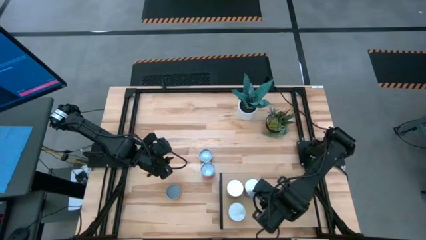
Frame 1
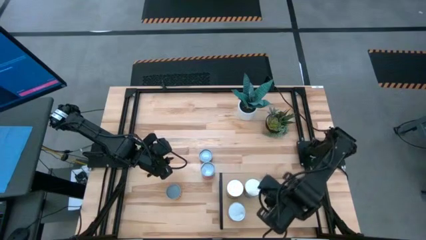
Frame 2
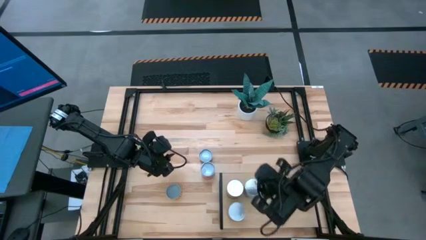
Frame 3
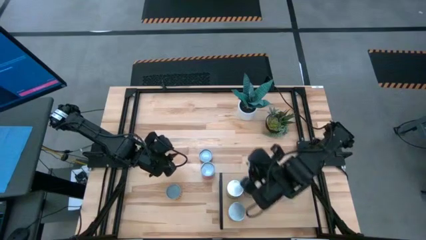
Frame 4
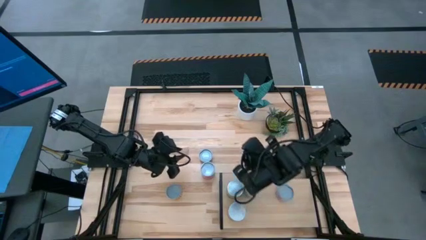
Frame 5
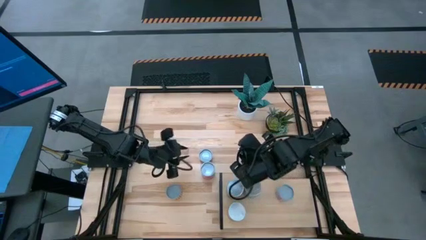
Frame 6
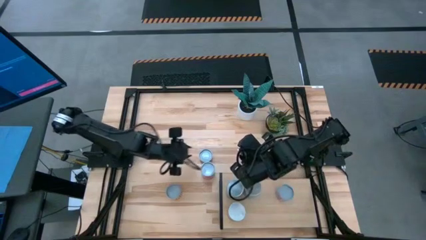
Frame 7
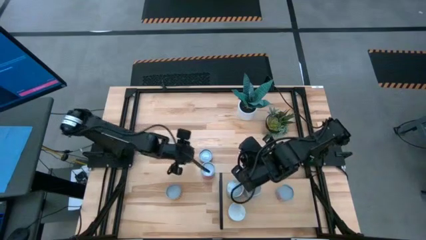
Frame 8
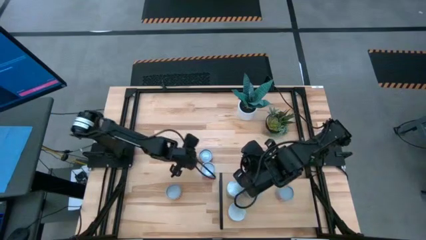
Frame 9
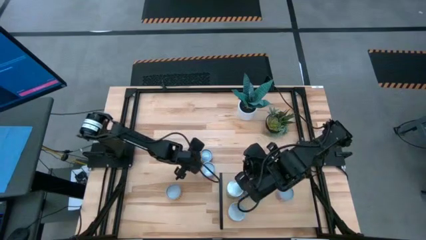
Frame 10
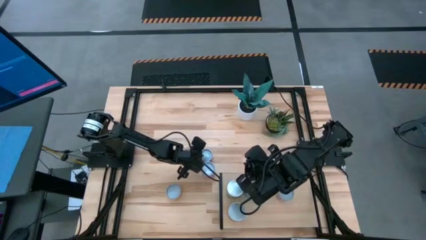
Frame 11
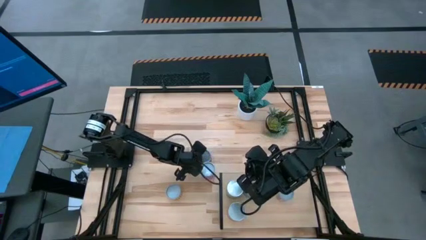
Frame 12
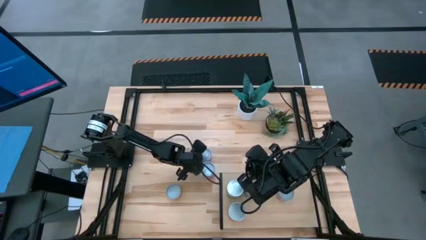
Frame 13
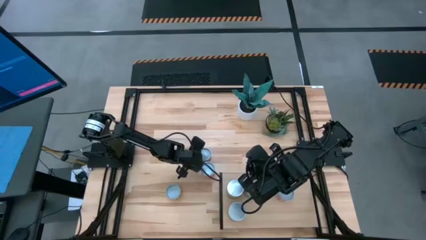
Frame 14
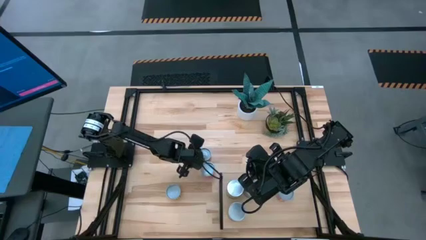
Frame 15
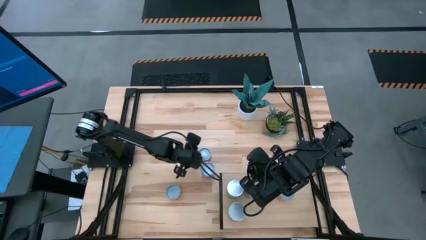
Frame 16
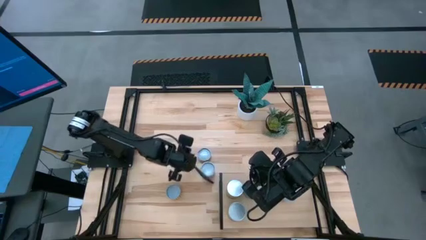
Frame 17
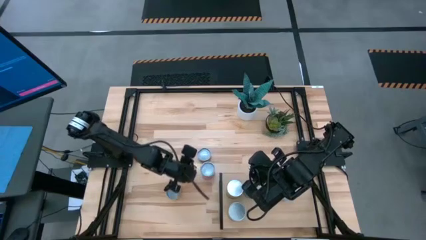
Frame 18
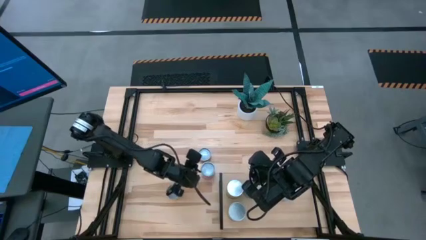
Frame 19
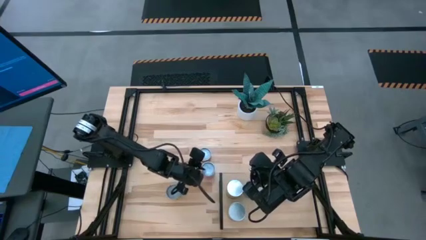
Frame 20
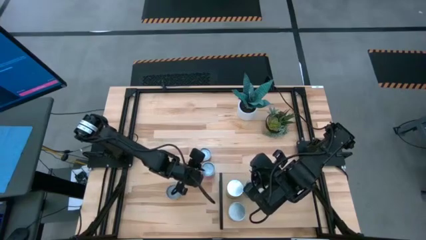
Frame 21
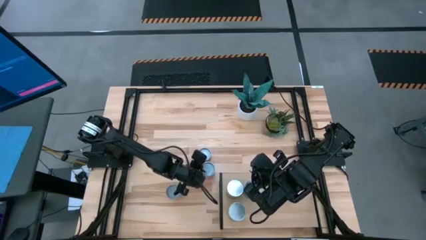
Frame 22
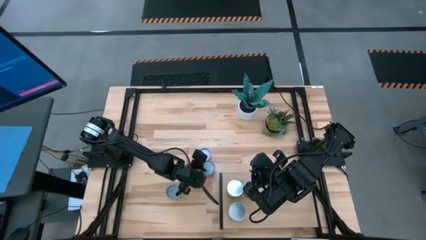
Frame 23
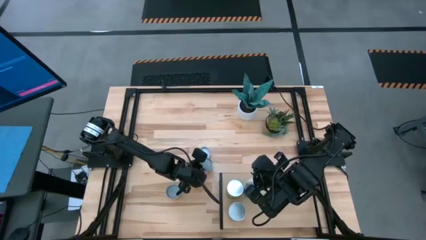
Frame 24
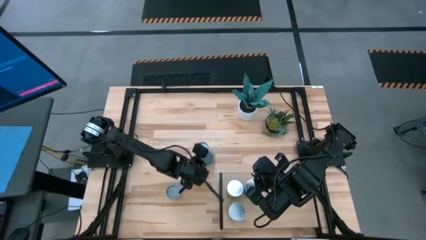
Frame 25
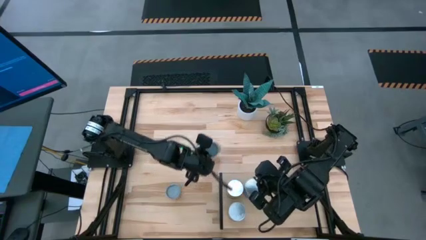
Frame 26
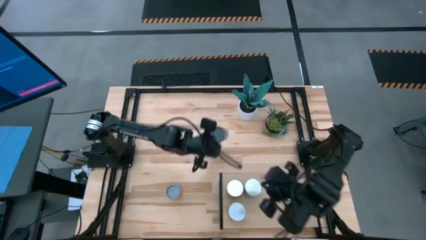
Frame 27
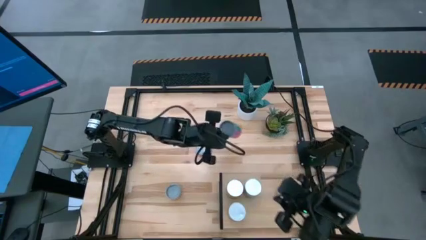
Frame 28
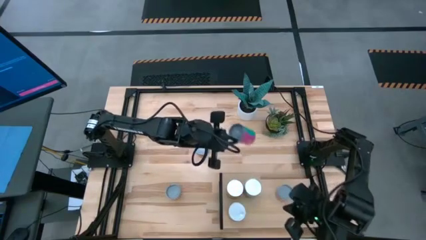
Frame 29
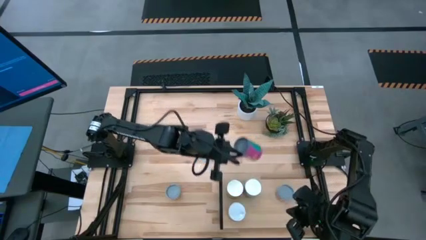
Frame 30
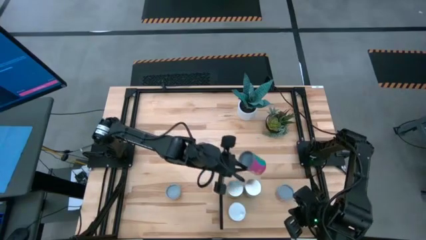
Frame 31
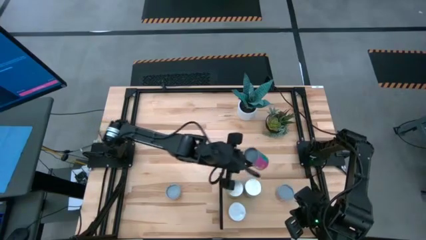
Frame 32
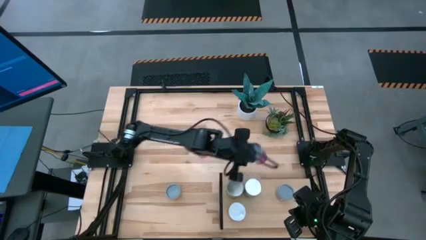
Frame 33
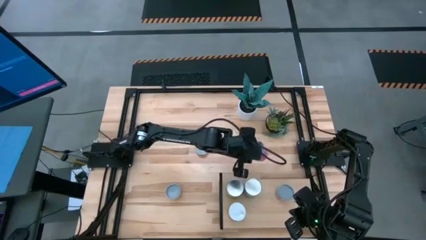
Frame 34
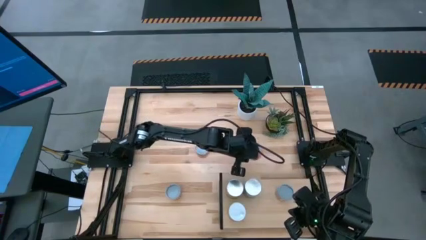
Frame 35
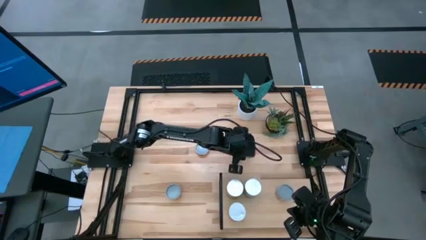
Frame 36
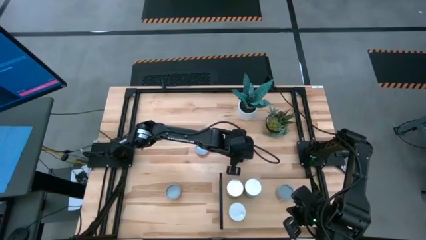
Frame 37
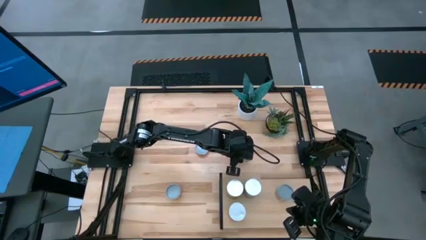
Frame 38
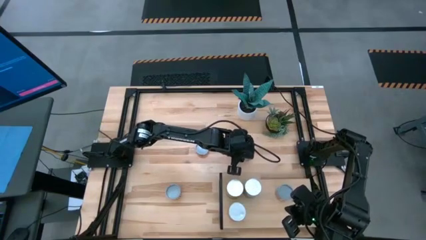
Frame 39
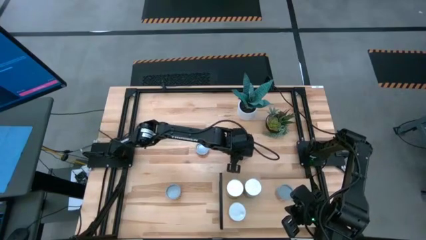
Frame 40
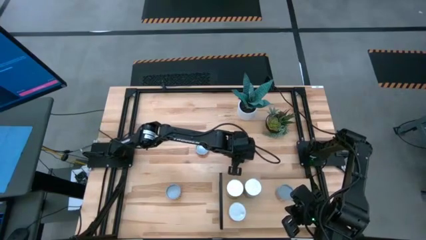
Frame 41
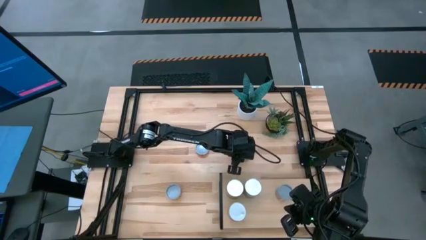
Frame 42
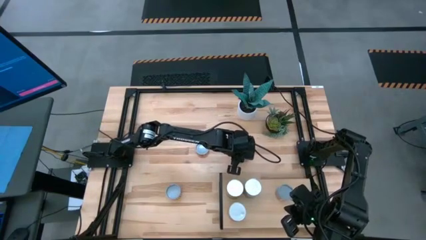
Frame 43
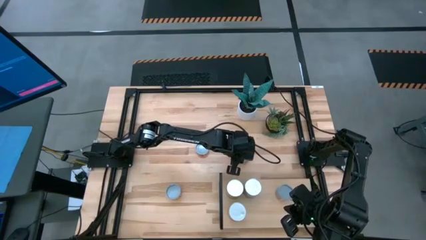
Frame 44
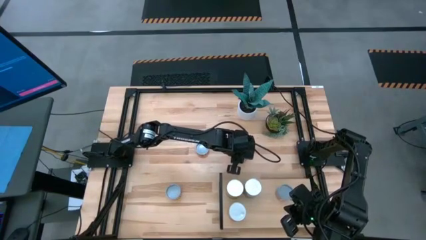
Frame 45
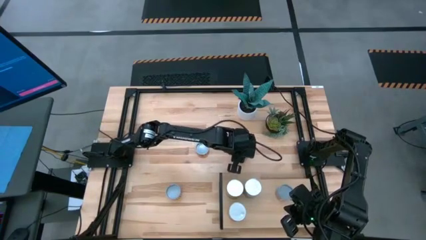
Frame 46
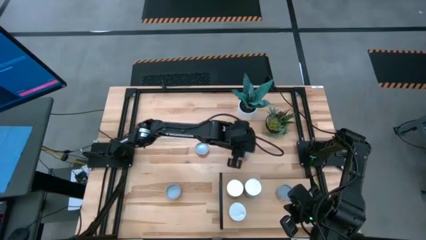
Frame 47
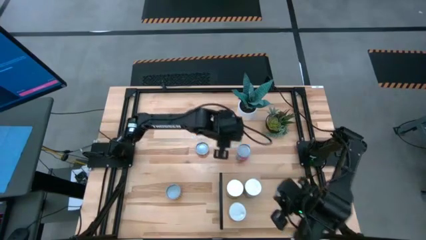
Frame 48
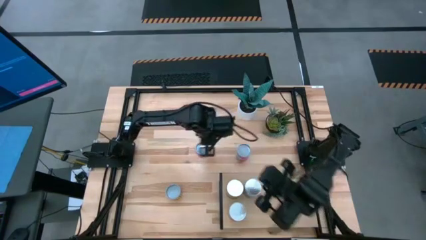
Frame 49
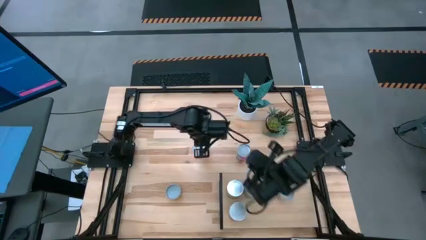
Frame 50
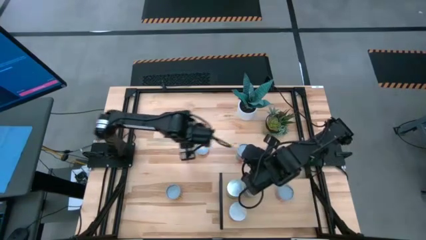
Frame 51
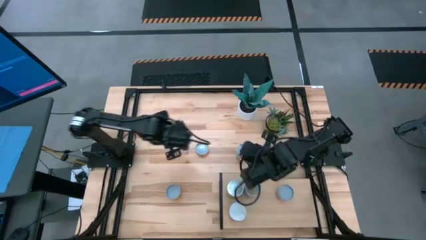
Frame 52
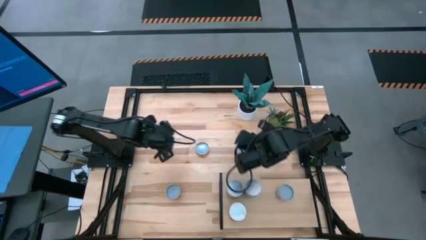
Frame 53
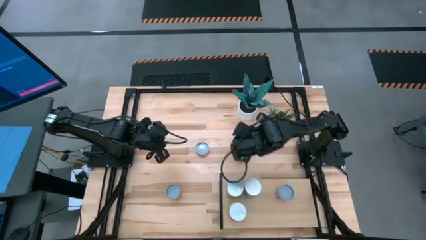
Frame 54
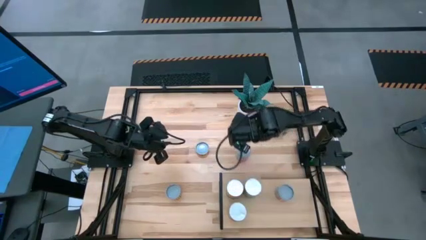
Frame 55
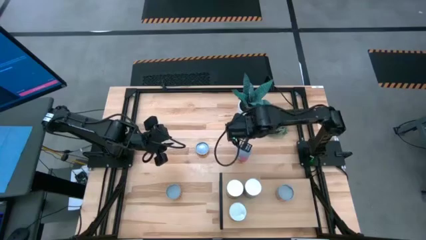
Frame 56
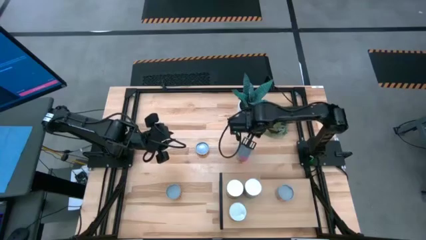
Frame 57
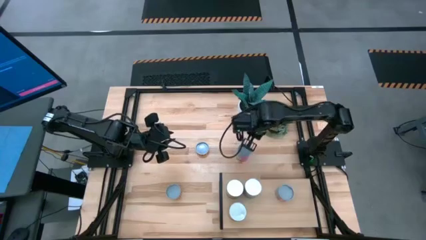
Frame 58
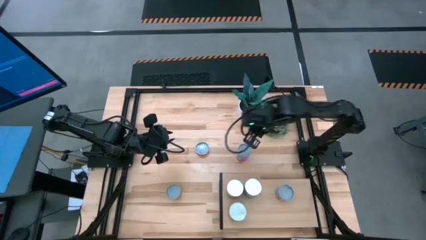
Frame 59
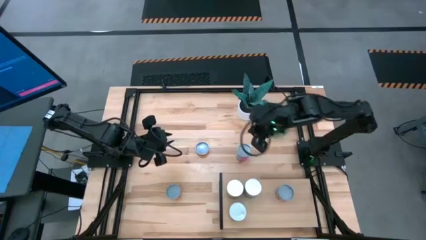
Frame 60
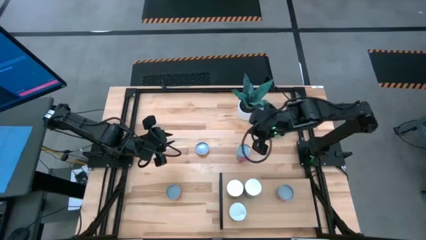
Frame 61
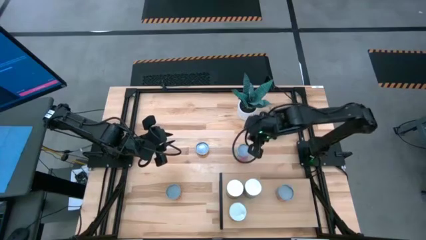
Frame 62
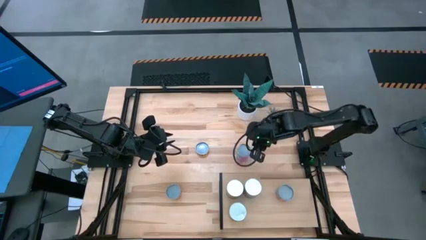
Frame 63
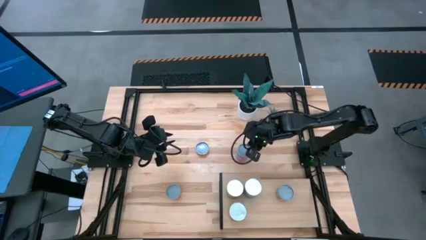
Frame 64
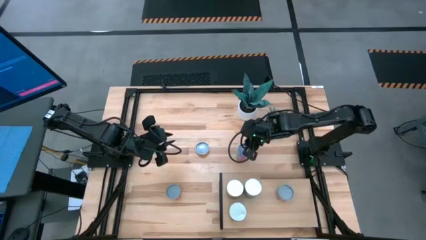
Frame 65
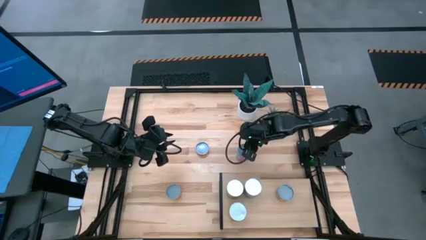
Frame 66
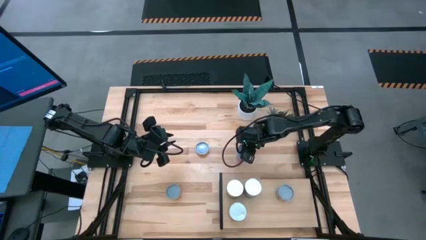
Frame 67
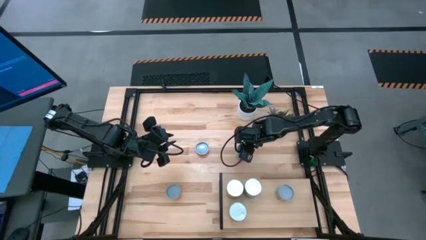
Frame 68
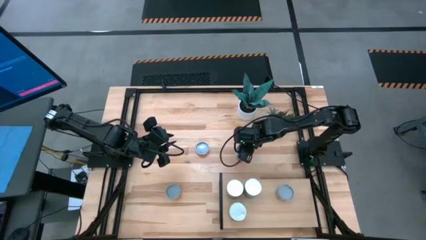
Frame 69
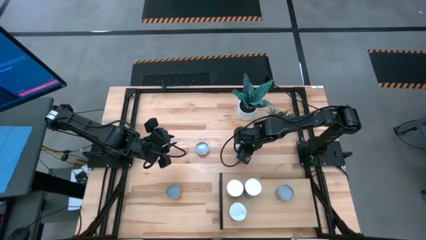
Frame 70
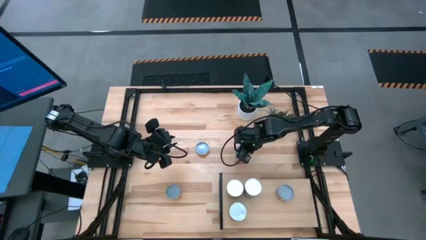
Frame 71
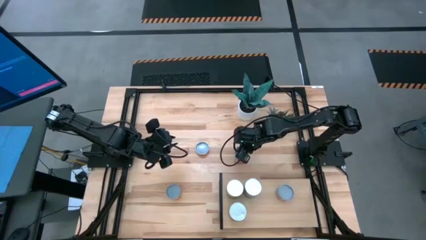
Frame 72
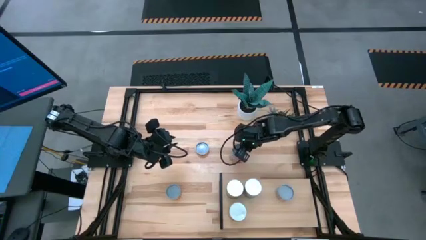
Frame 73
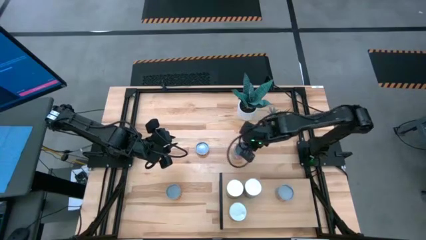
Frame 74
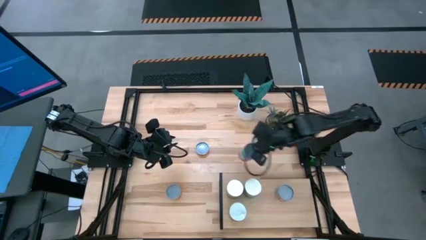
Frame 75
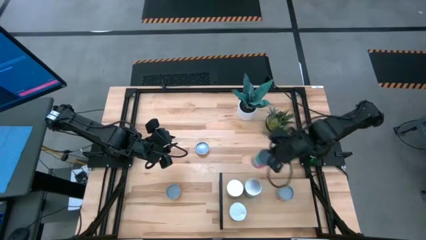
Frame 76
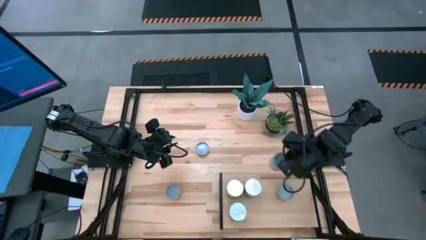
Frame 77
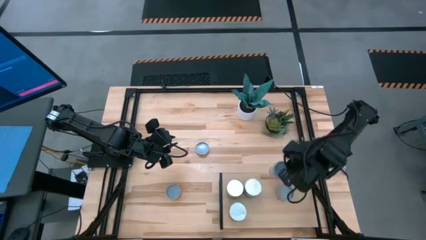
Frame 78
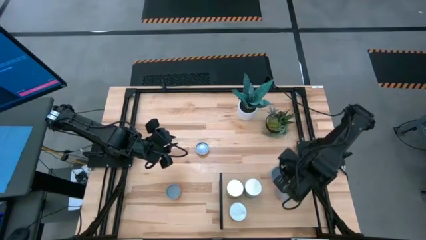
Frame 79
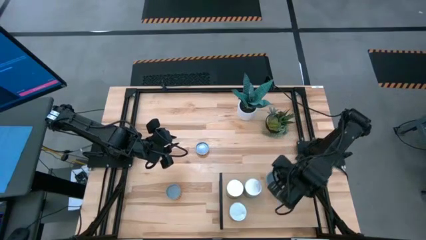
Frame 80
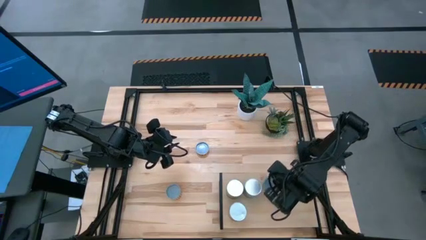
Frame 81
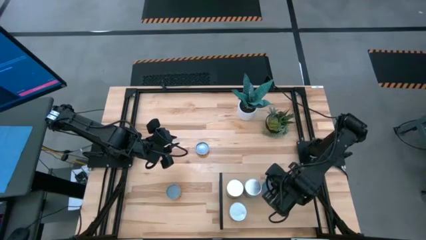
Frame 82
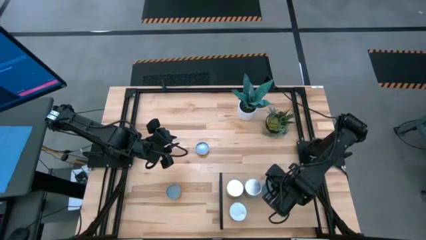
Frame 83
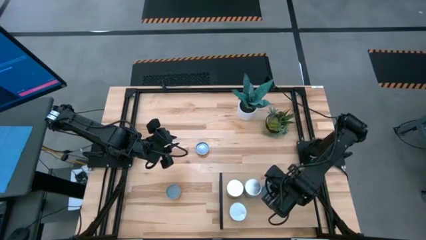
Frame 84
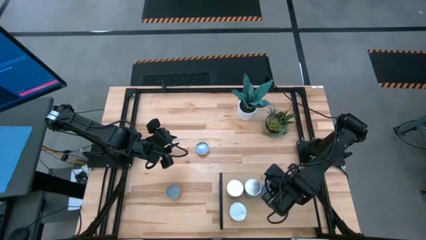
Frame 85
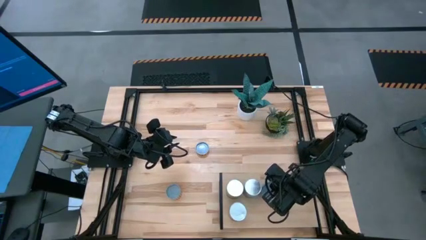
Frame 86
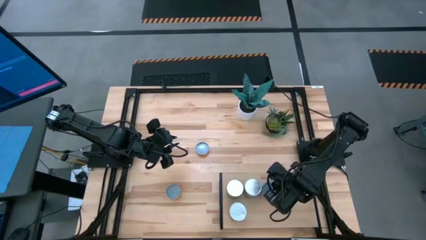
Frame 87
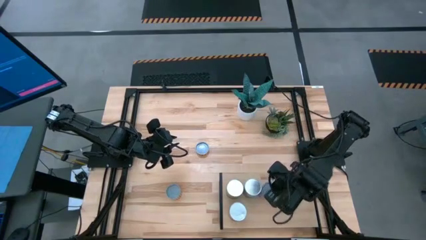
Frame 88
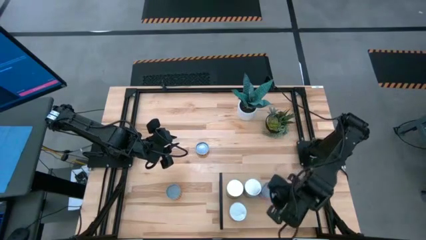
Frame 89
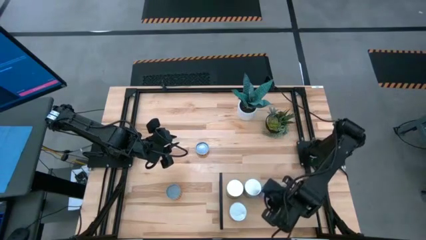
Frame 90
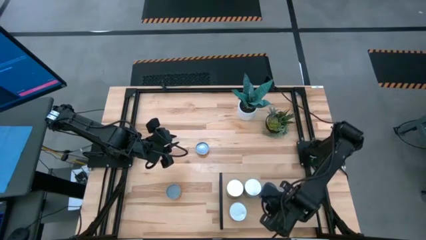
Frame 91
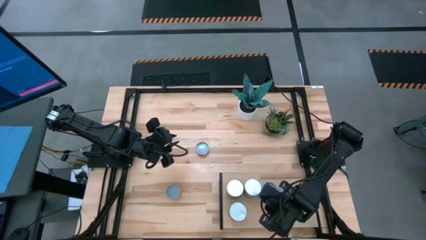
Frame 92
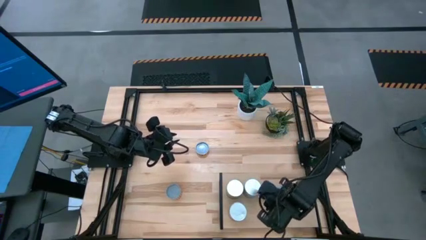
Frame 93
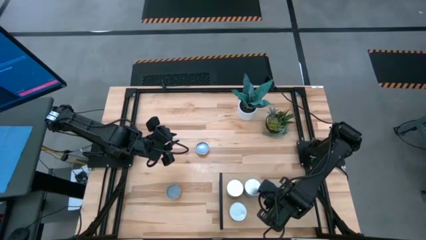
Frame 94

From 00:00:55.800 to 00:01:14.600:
Task: Pick and place cans onto a shelf
Put the pink canned chicken soup on the shelf
